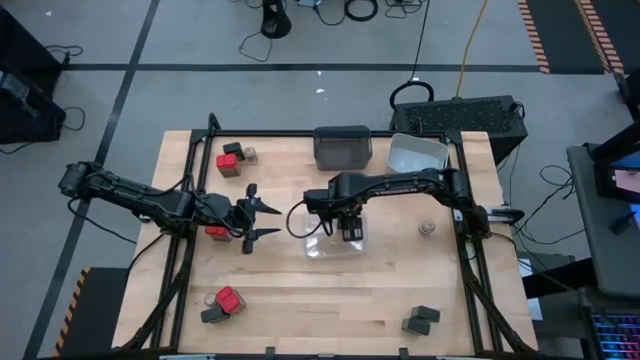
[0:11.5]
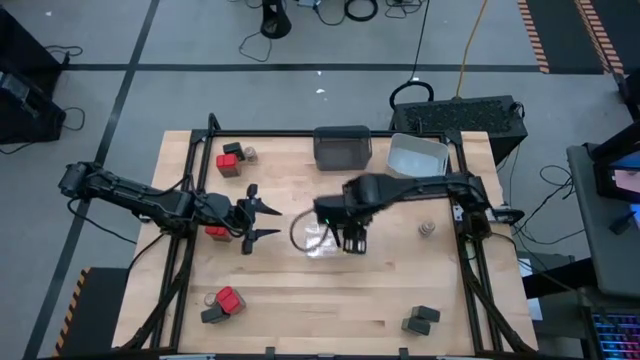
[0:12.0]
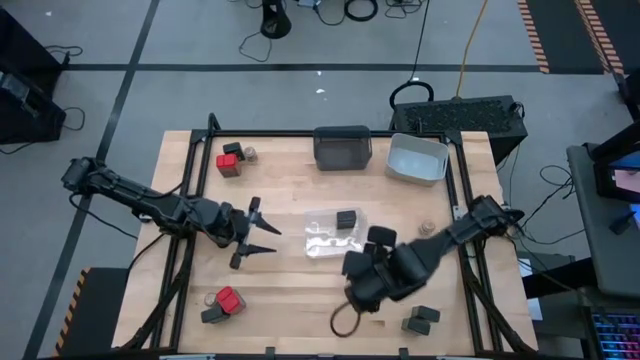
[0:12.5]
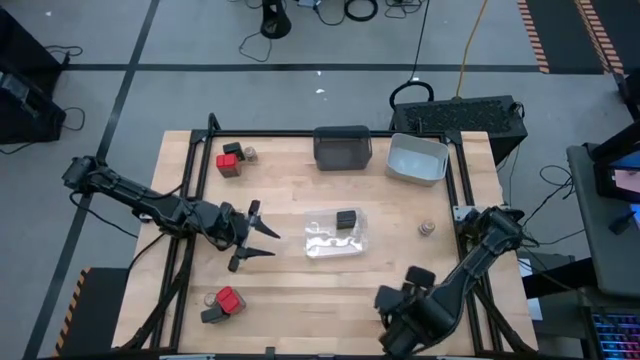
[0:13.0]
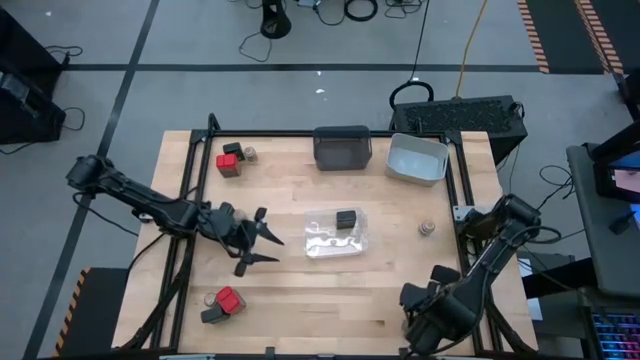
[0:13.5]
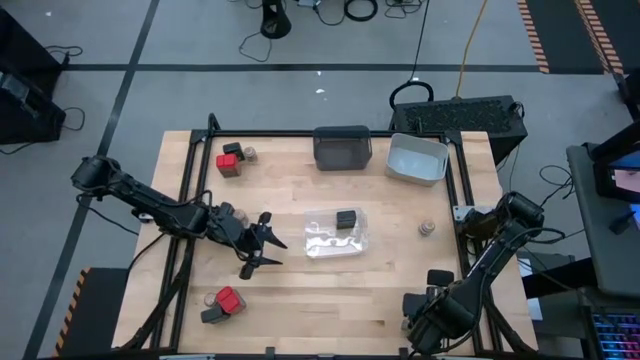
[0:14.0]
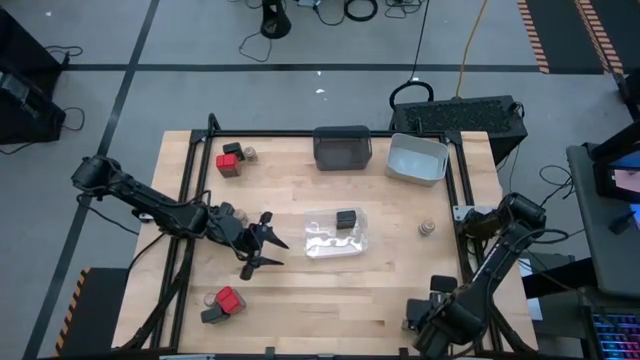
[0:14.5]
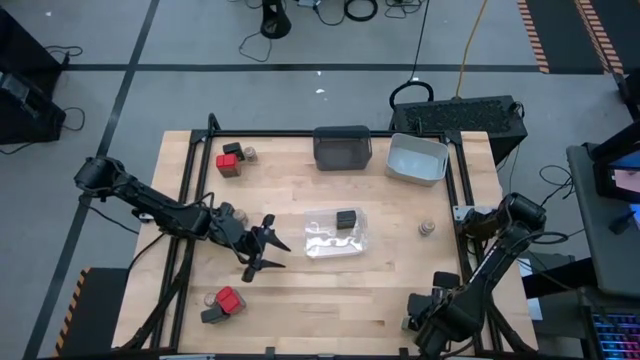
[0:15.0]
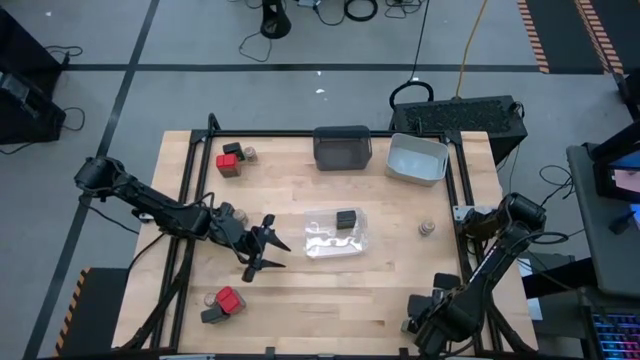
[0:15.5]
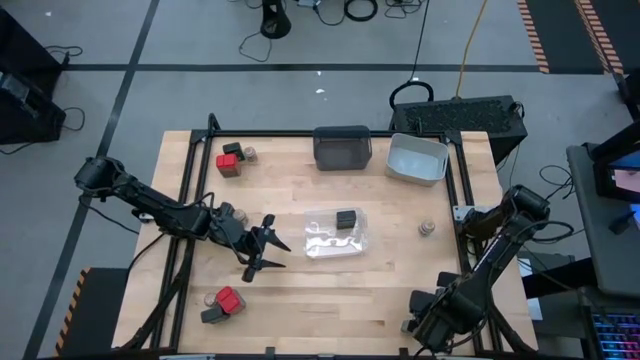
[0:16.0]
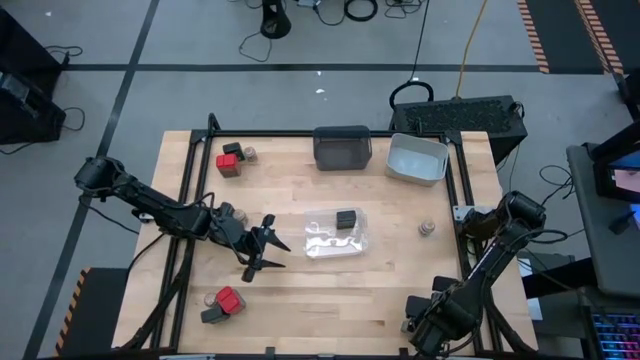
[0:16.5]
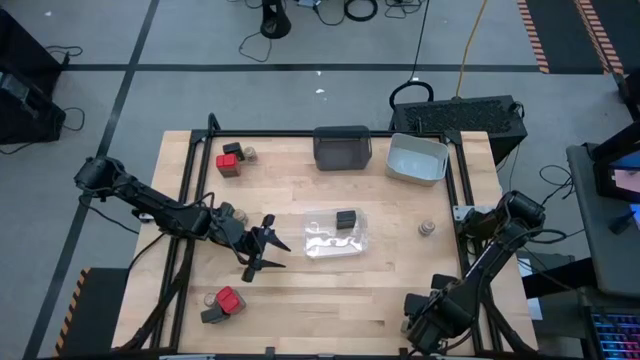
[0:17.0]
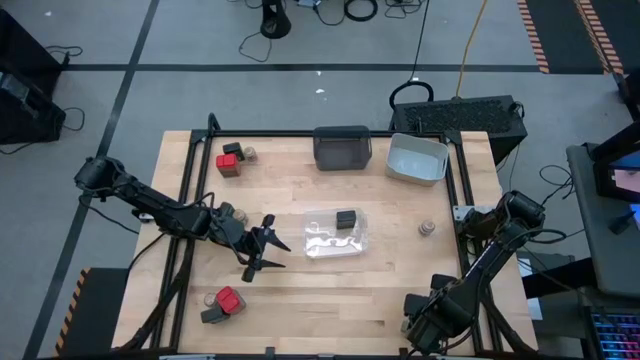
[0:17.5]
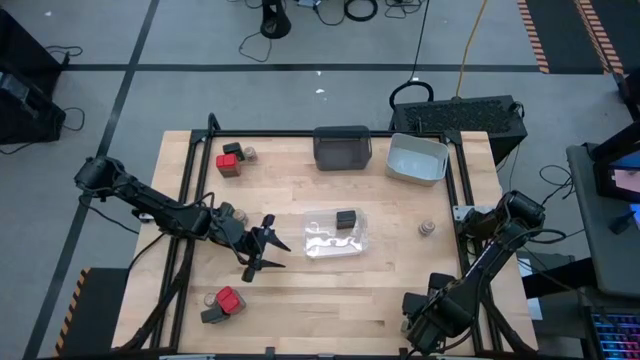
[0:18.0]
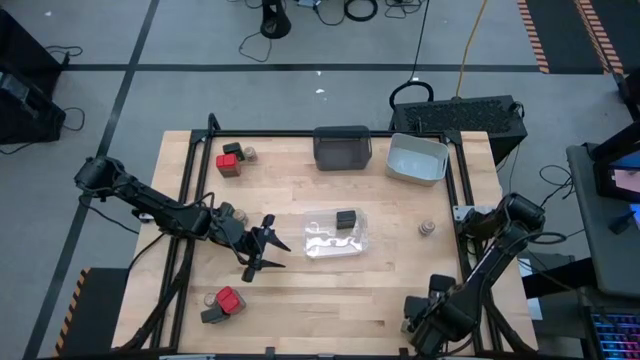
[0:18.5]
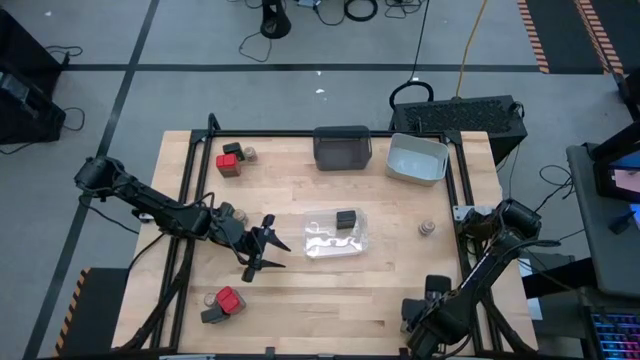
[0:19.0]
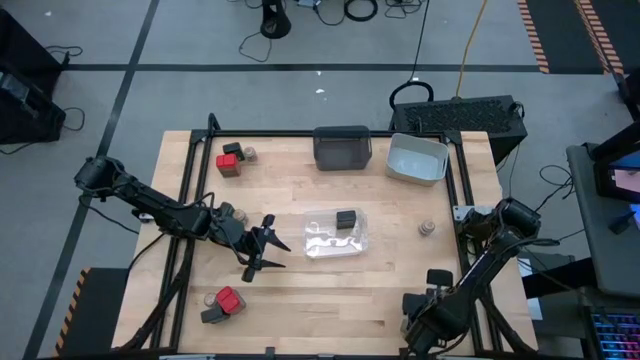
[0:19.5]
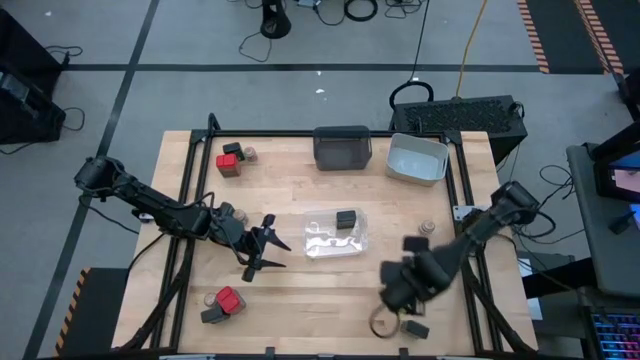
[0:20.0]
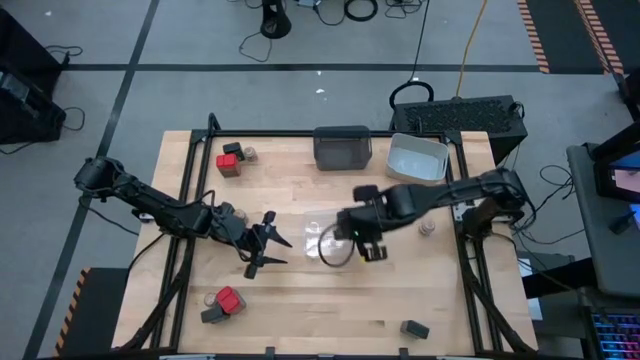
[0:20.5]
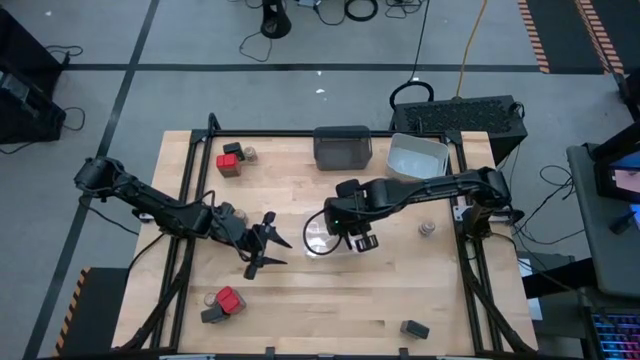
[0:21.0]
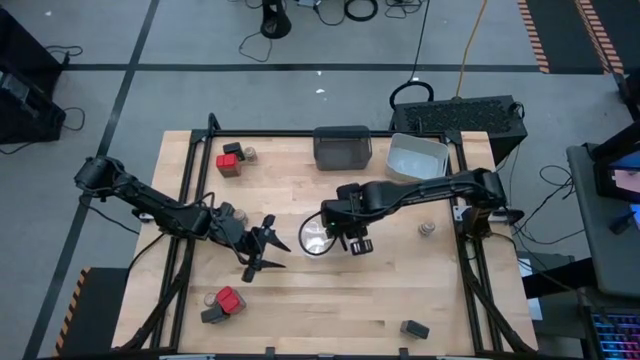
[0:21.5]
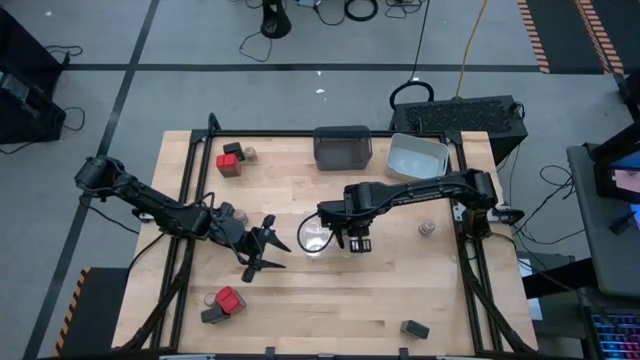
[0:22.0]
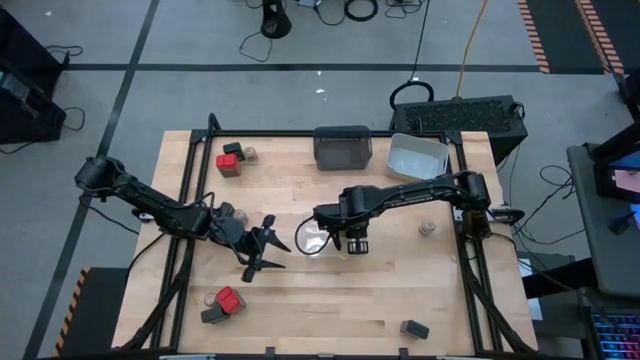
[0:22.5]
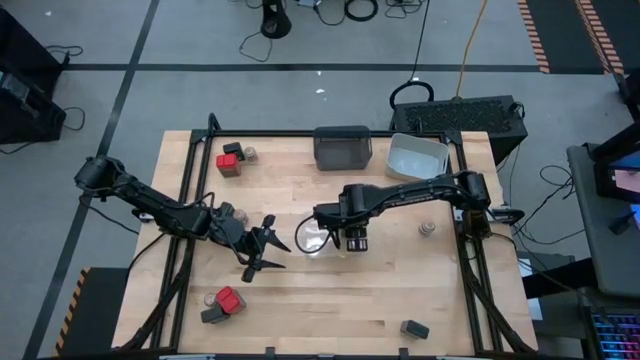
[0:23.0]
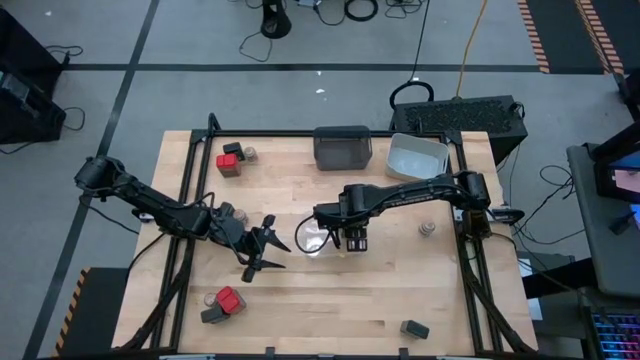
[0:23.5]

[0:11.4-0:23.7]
Task: Sort spices by type
Put the black seasoning can into the transparent bin

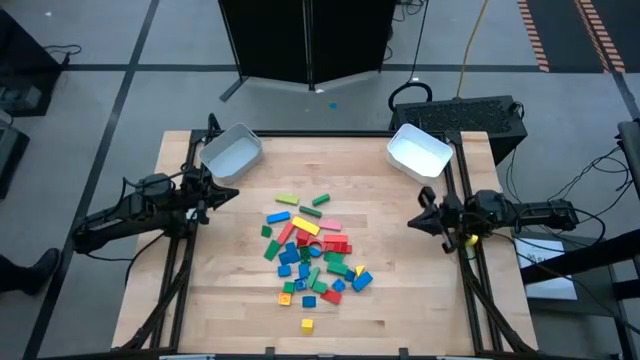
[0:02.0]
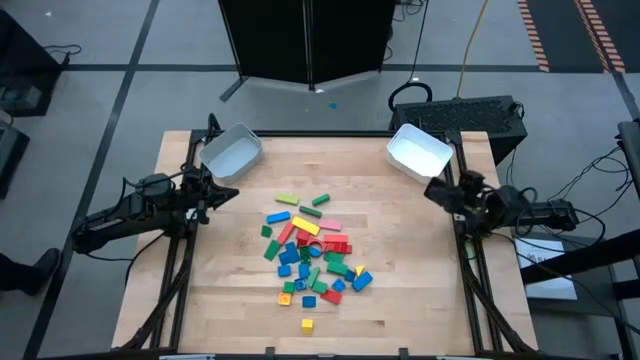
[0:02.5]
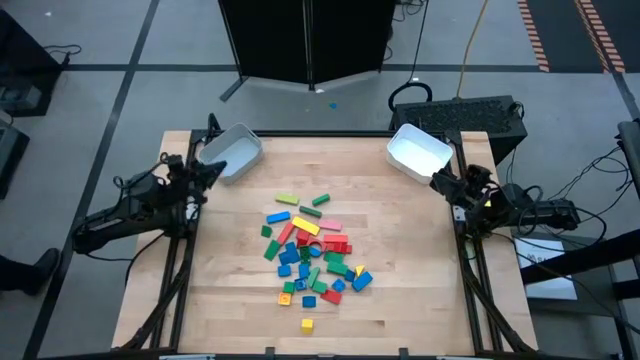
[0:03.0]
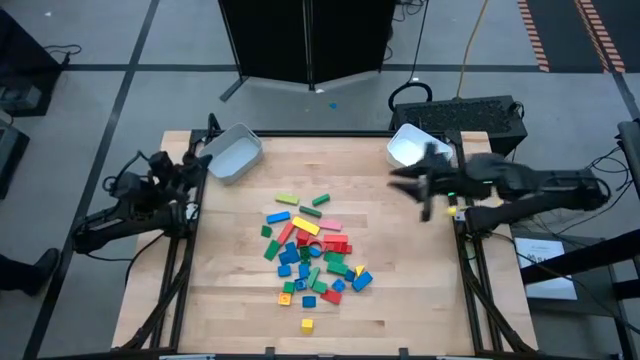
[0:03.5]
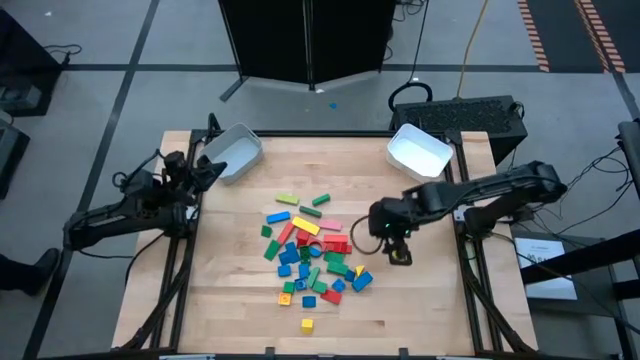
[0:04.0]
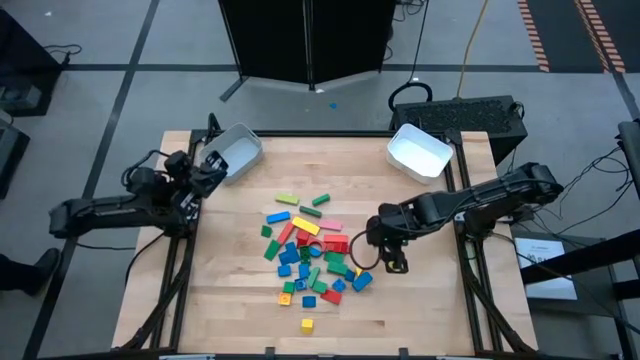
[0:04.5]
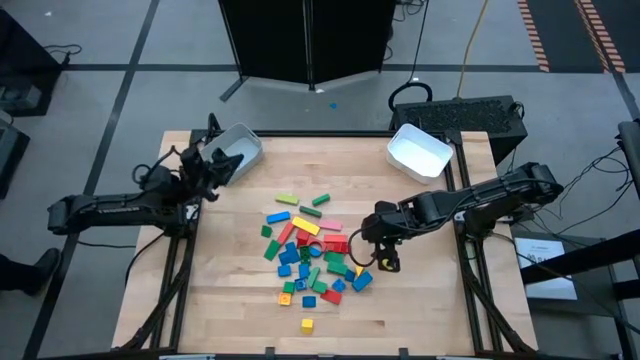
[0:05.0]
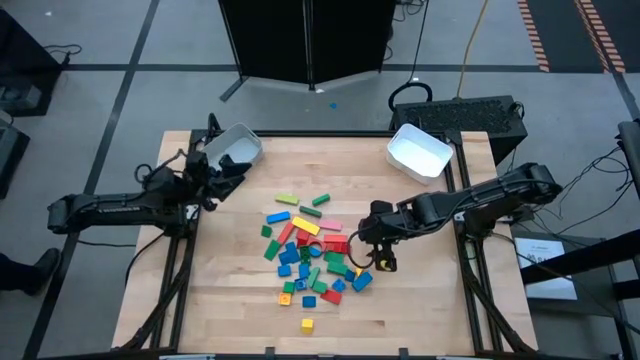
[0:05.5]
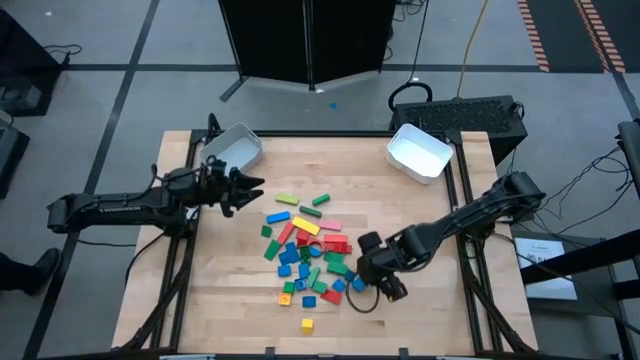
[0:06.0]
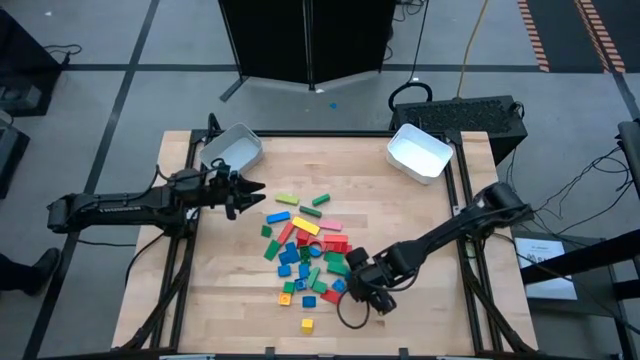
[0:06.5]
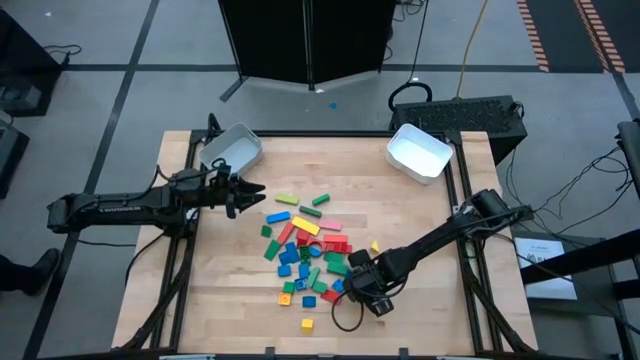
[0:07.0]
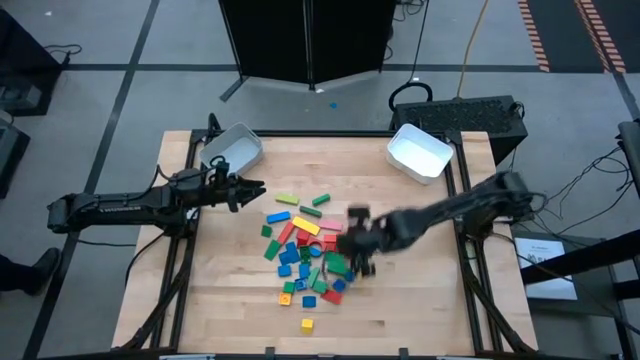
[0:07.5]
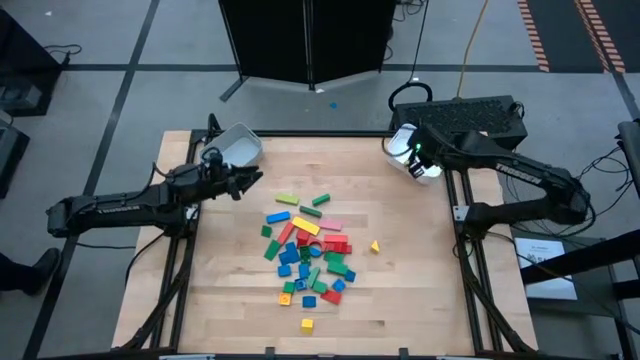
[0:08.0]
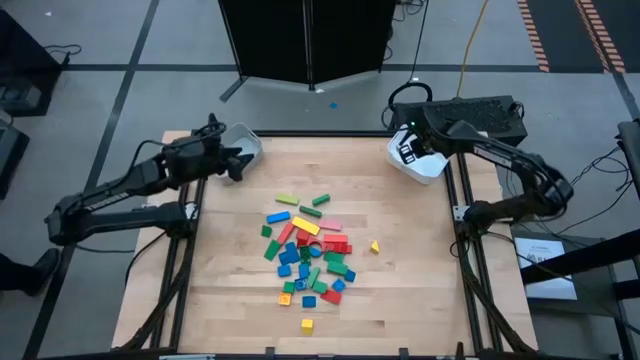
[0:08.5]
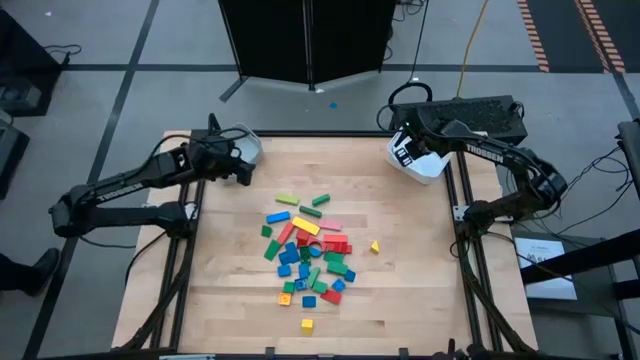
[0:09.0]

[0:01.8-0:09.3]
Task: Sort blocks by size
Put the rectangular blue block into the white bin

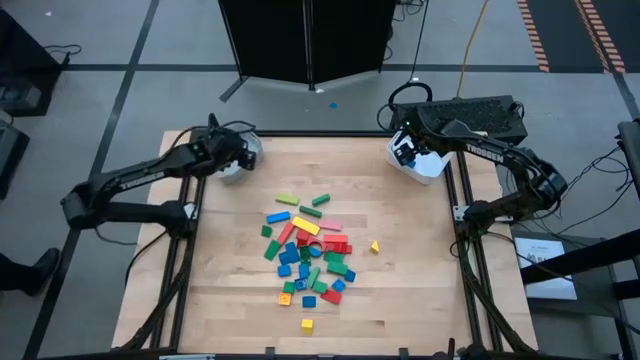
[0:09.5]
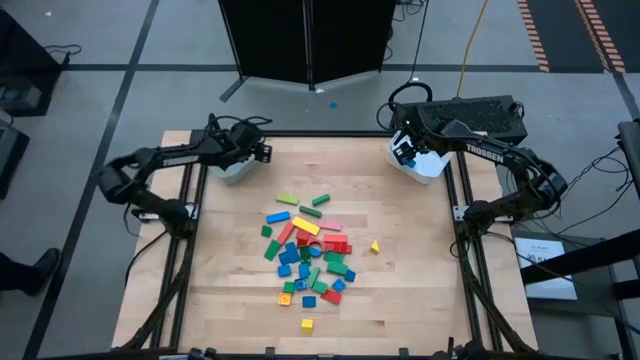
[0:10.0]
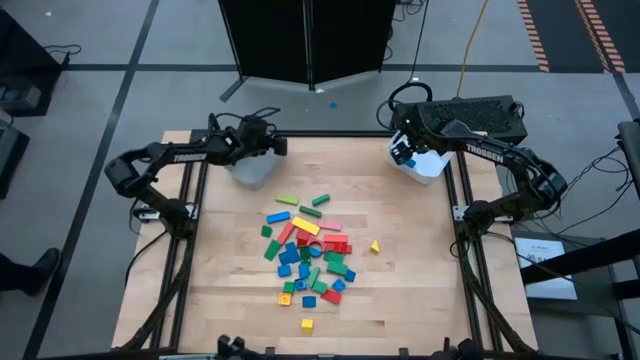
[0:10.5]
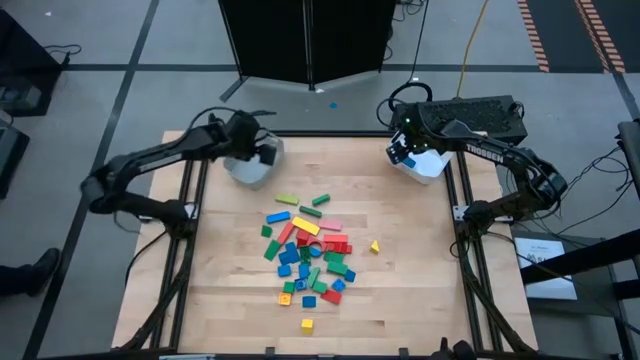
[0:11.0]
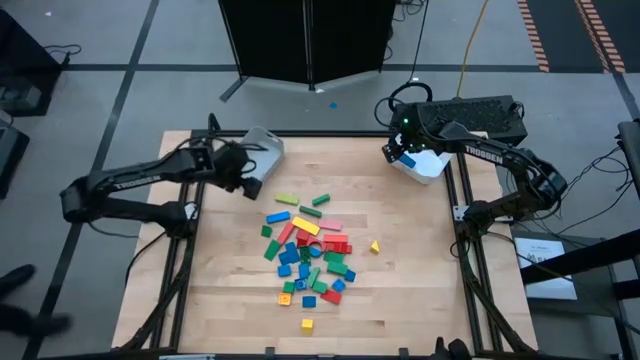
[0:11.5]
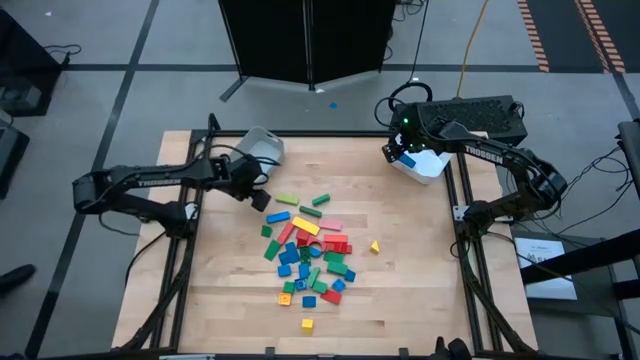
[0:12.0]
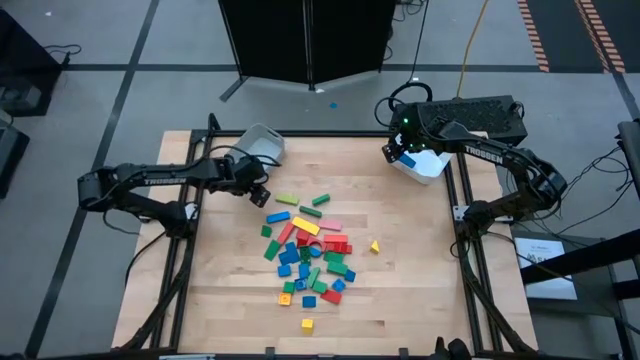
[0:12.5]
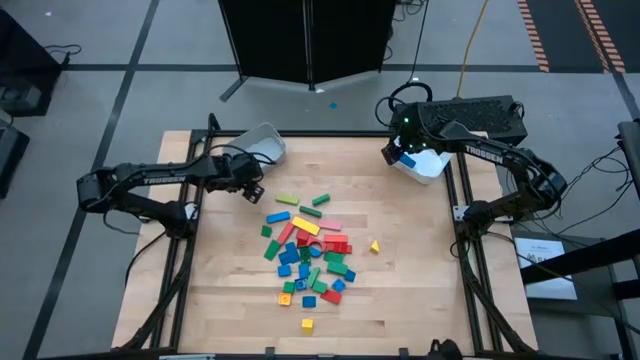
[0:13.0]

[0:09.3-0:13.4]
Adjust the gray bin on the table
